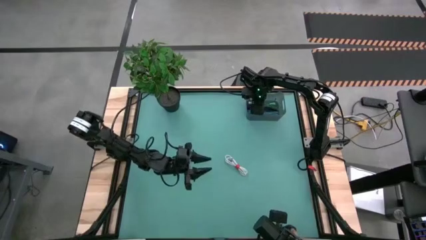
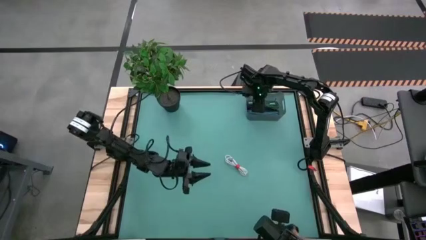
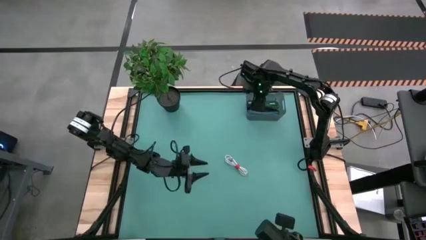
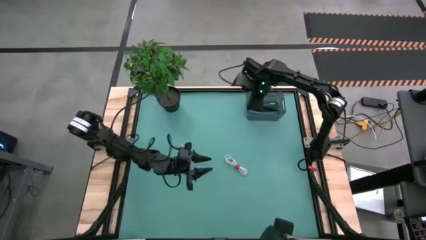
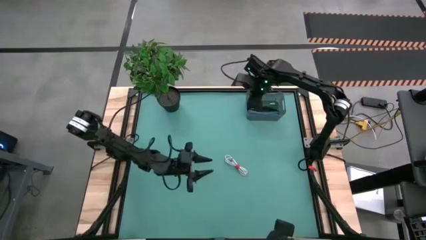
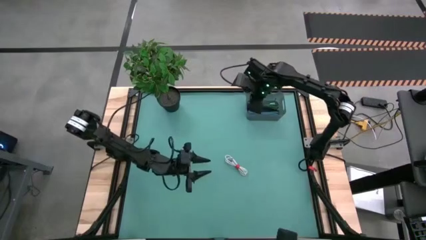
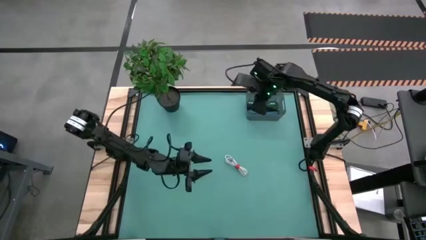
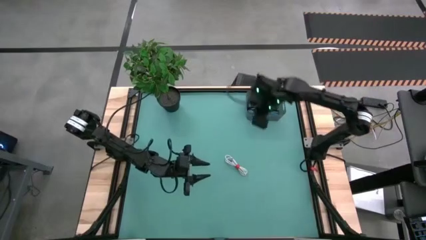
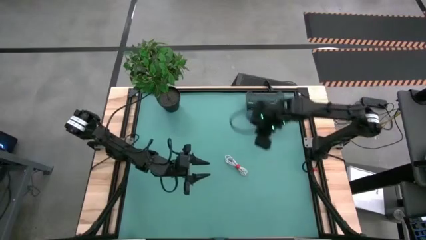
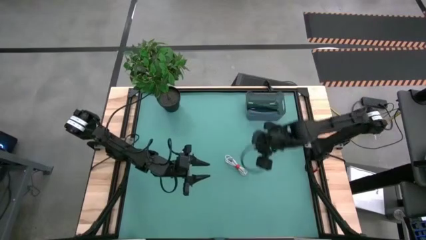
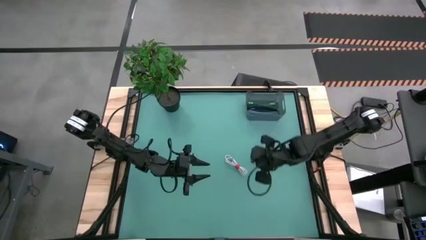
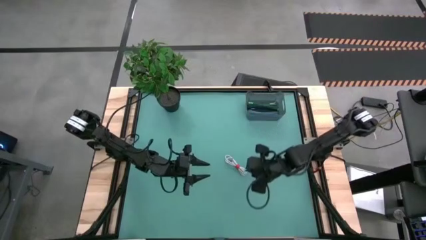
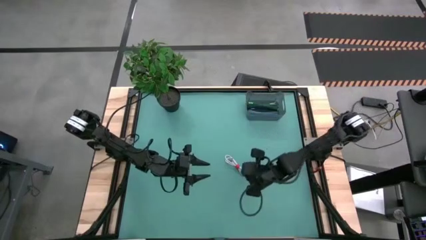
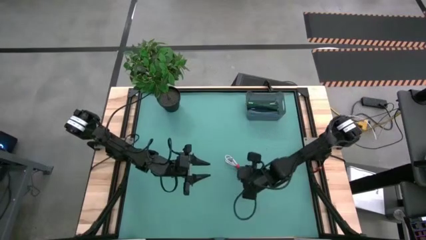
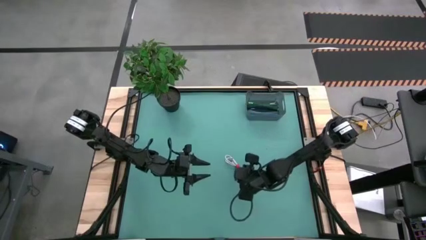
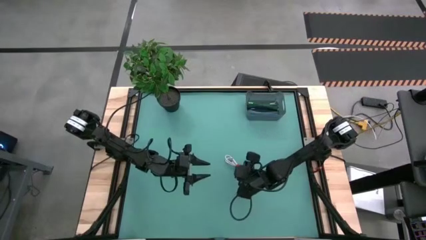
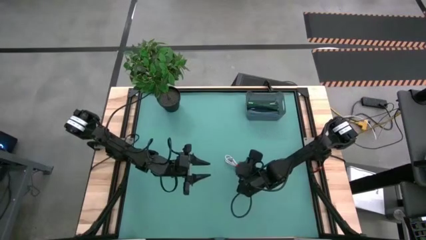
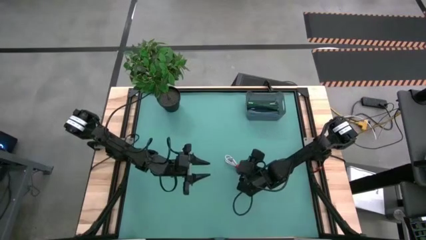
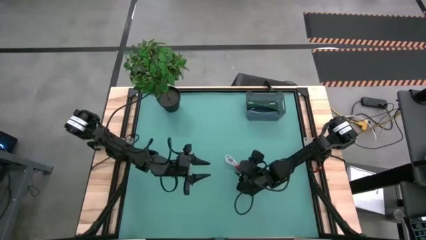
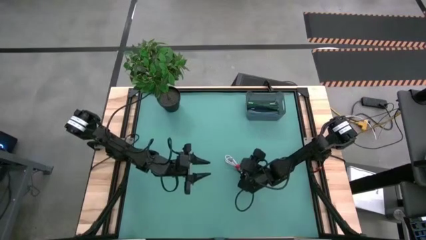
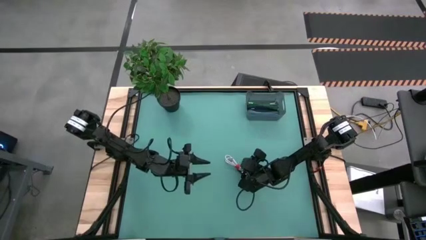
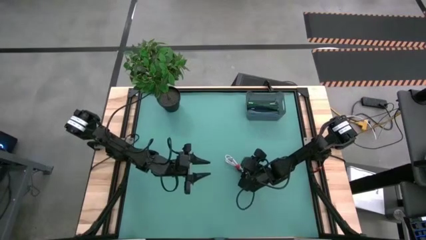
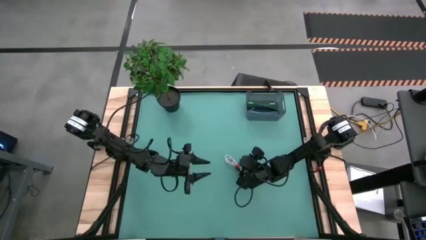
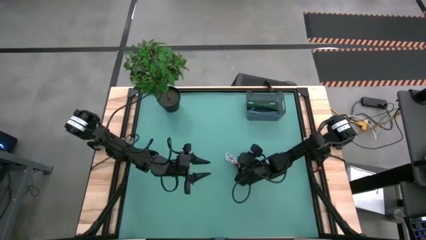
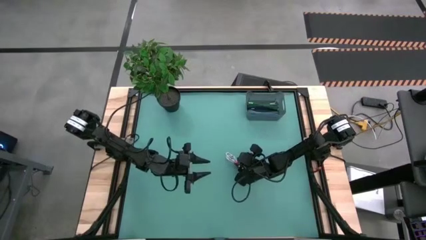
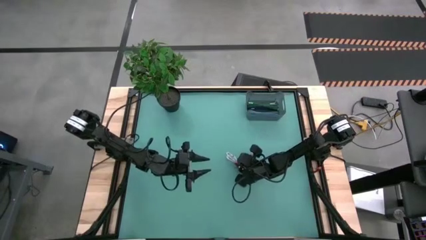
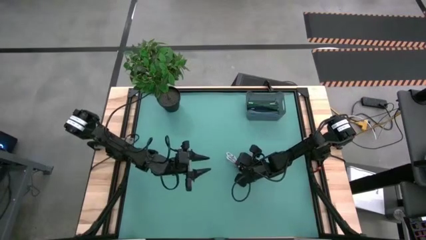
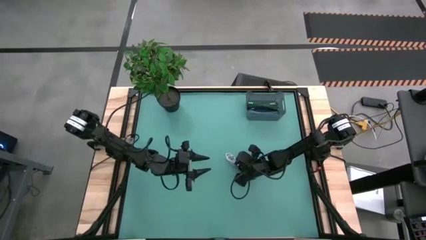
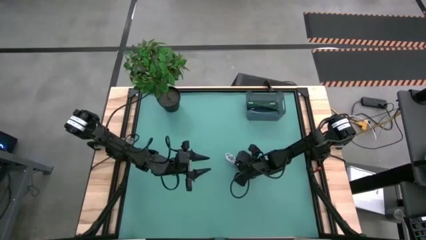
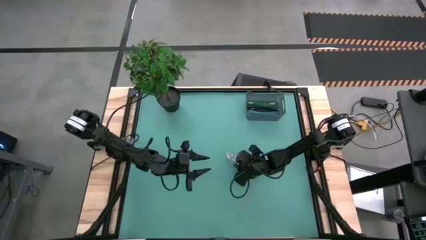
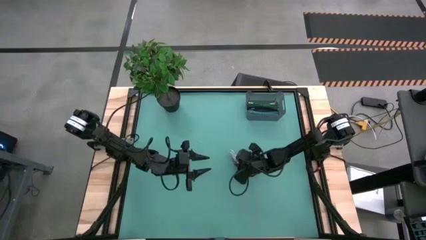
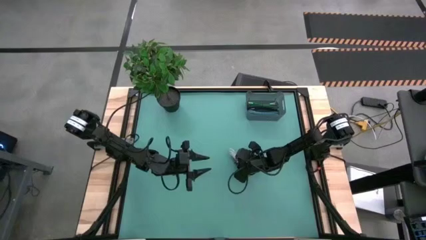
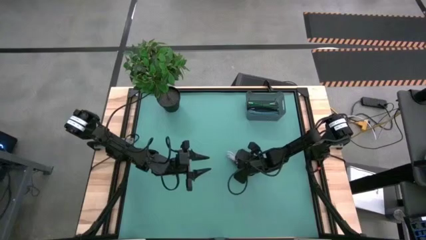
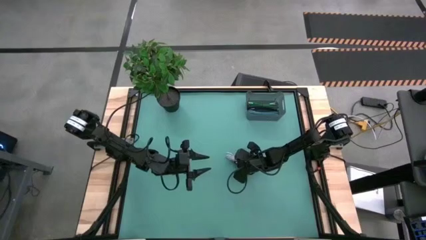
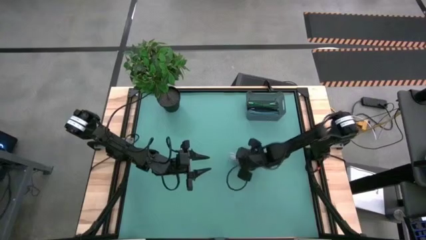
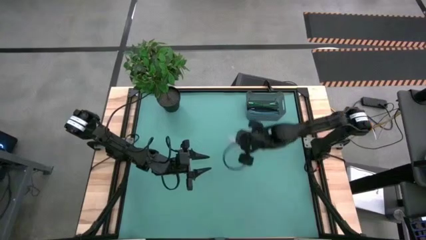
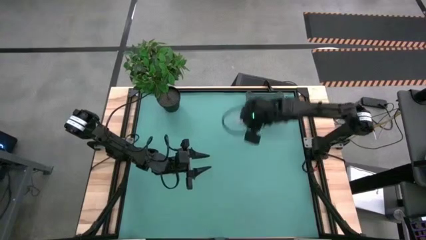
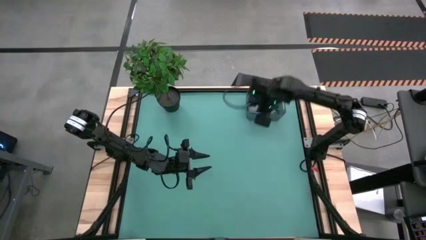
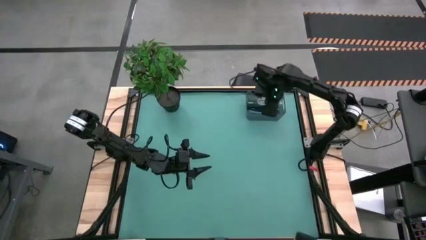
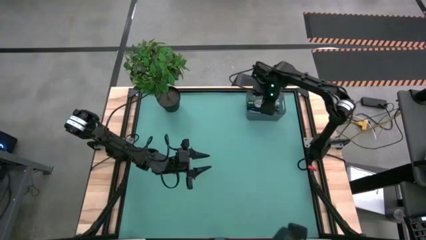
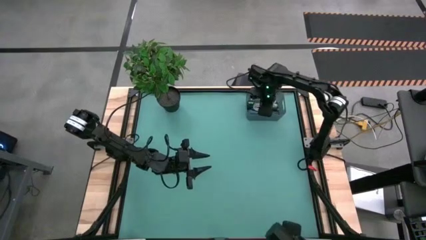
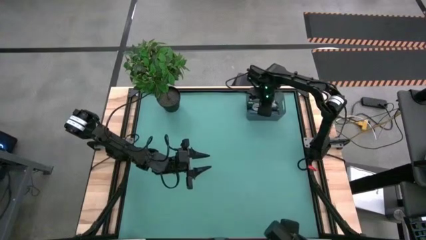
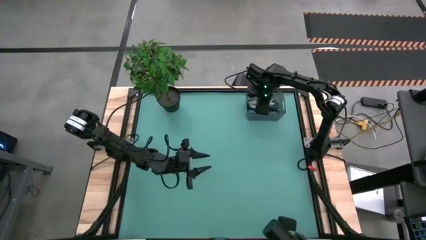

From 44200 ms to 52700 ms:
Task: Pick and place USB-C Cables
Put the white charger cable into the bin

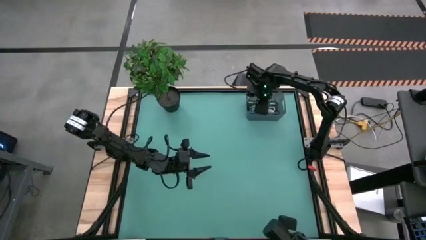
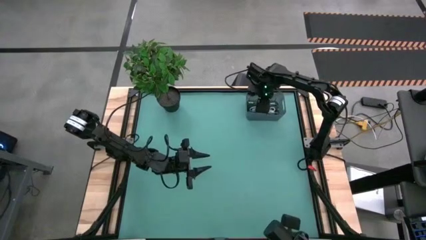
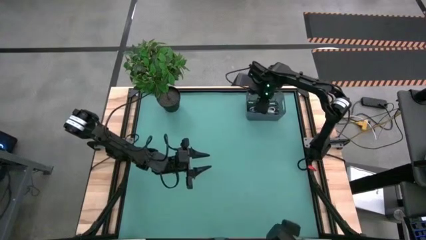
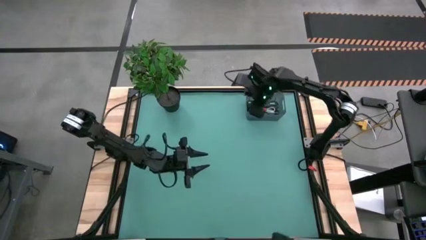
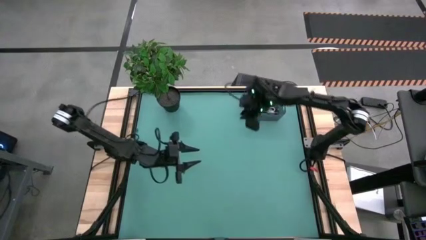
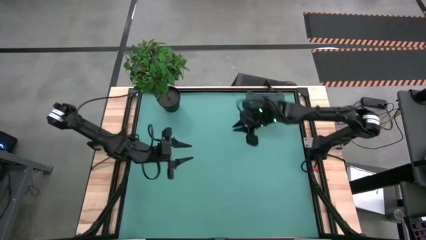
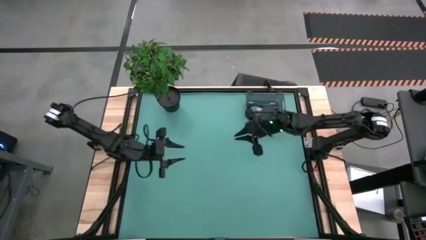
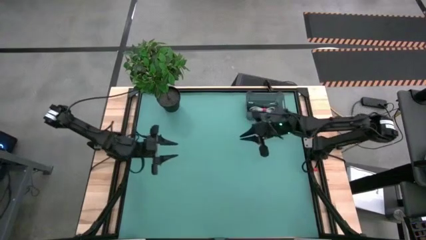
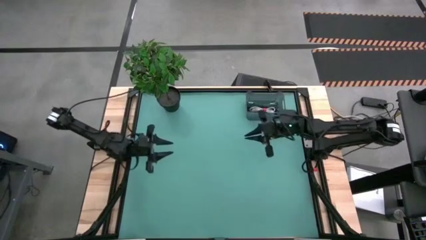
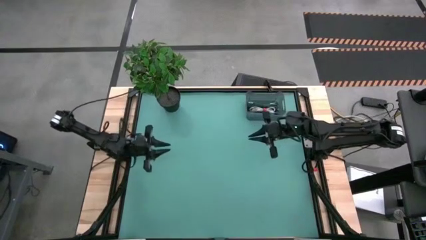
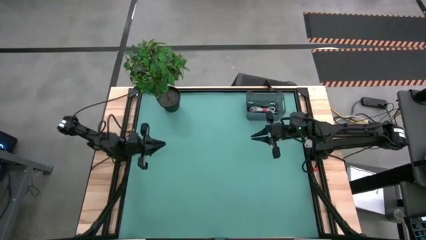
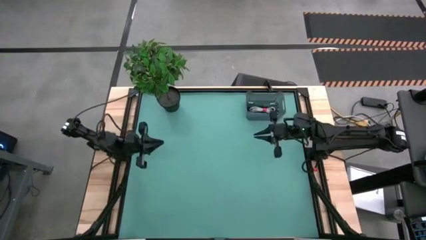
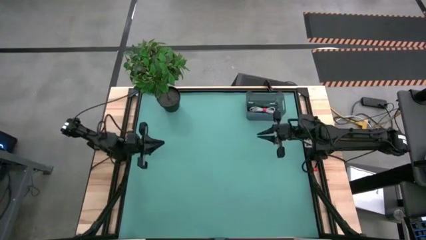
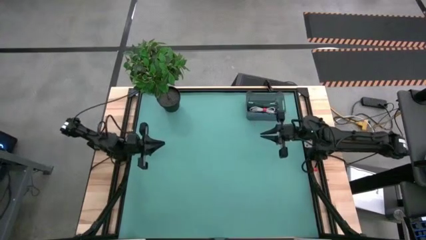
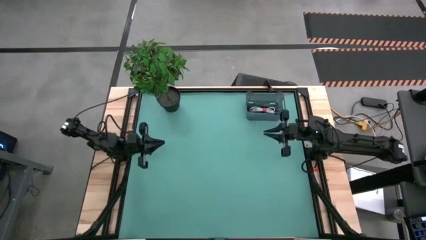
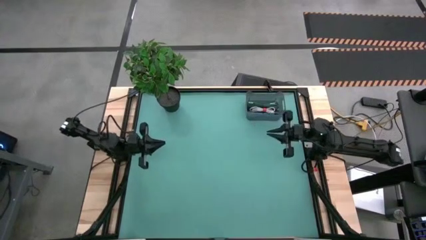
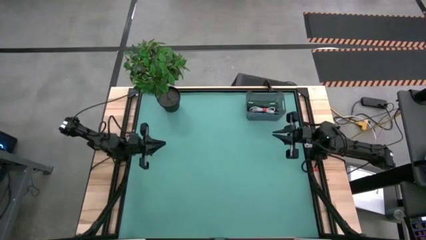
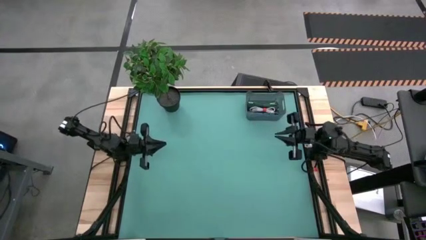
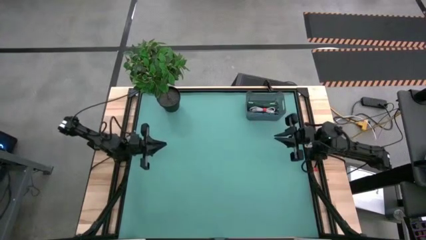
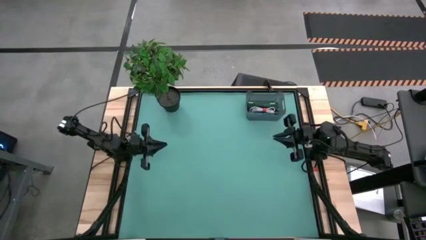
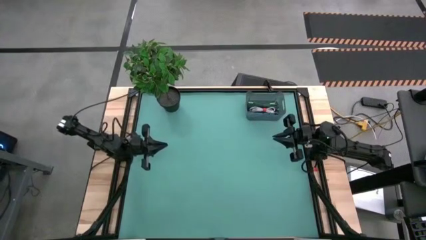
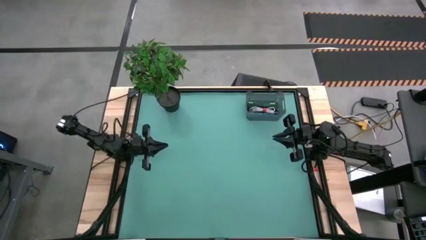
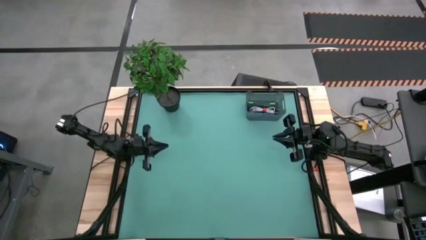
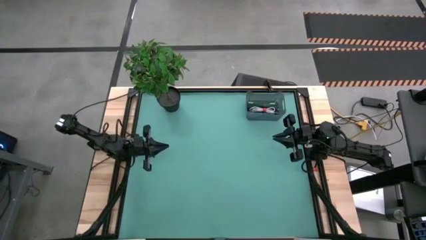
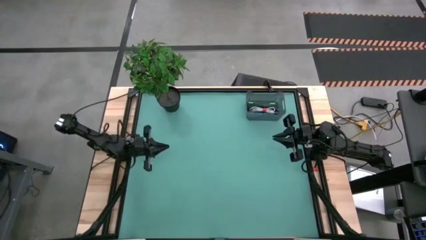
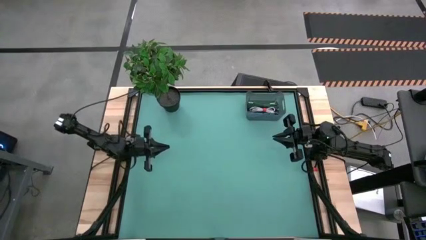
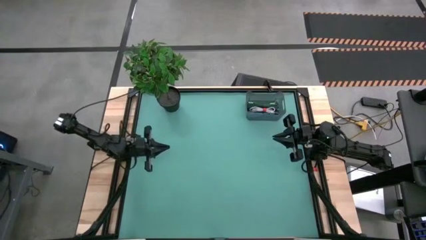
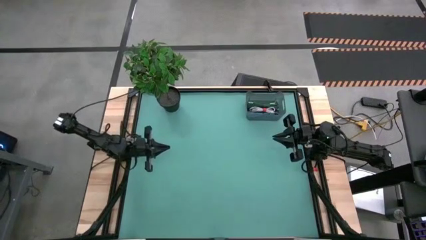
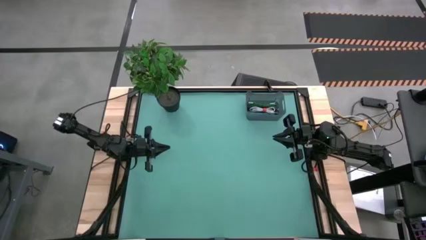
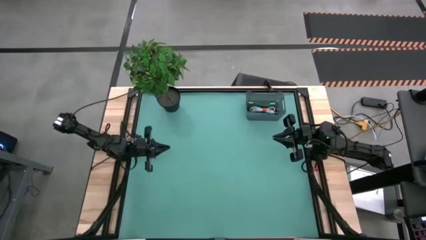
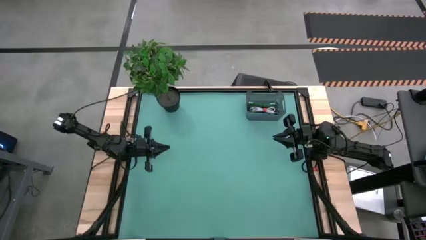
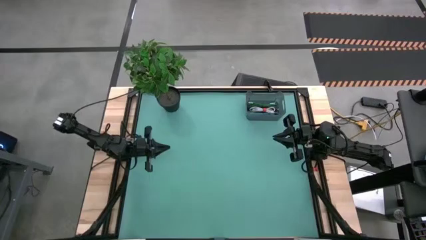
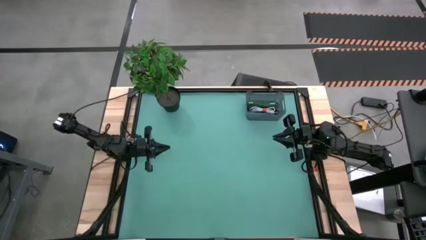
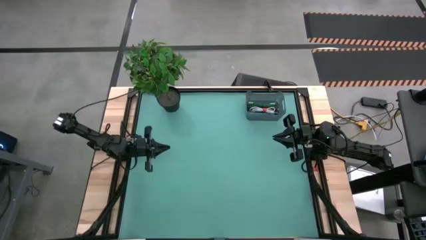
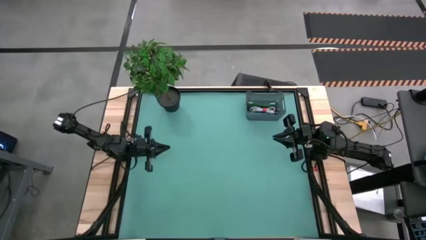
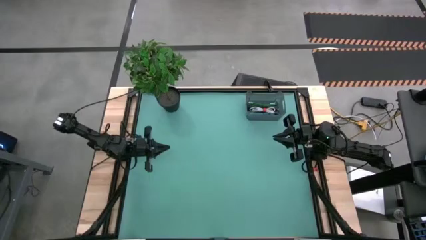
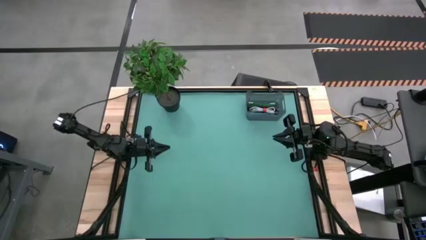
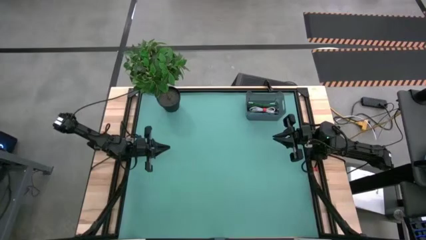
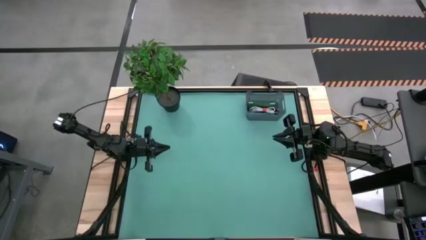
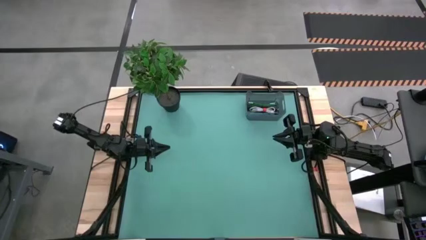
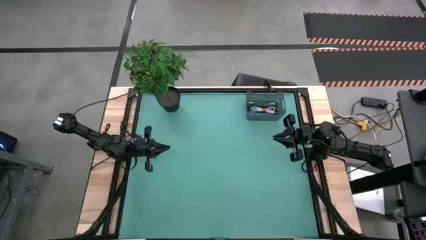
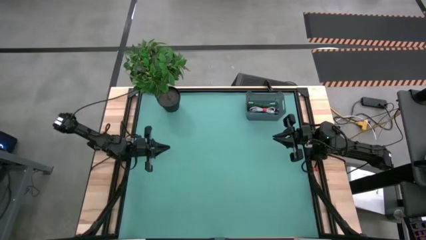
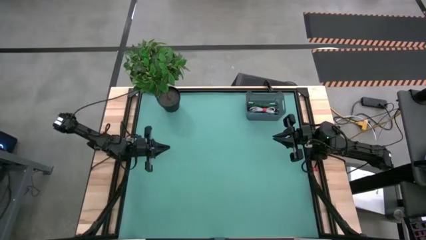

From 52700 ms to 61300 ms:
Return to Home Position
